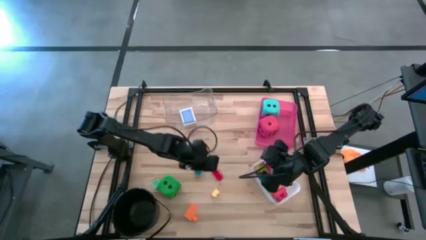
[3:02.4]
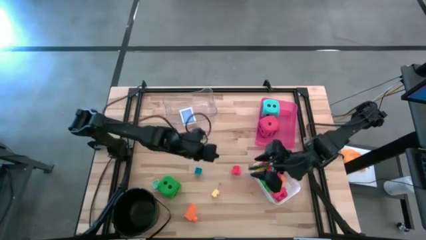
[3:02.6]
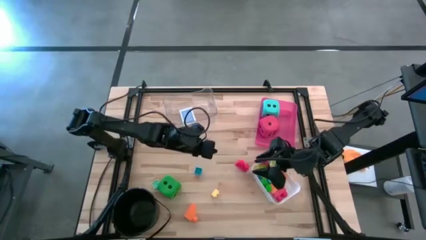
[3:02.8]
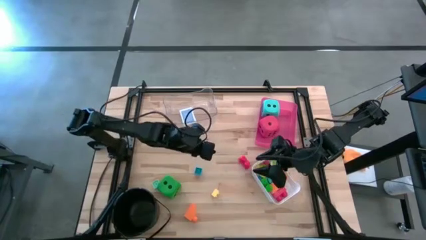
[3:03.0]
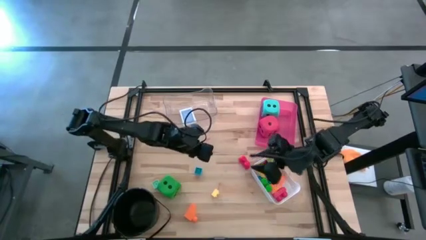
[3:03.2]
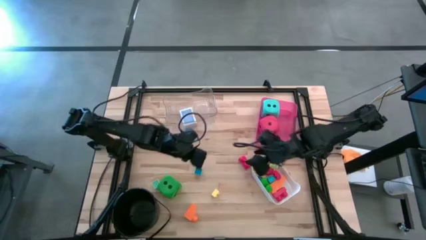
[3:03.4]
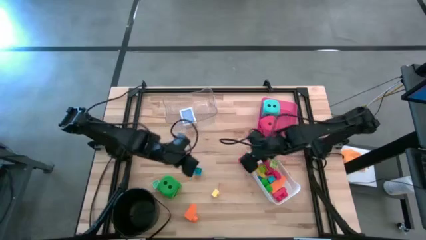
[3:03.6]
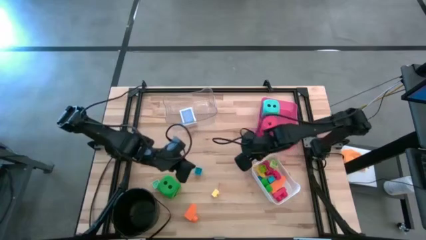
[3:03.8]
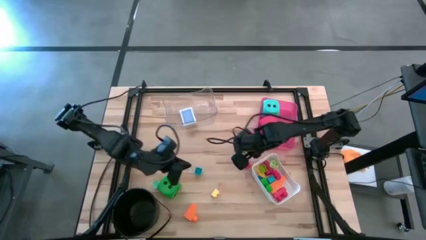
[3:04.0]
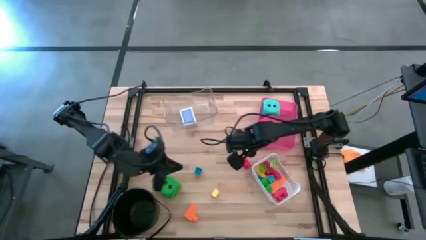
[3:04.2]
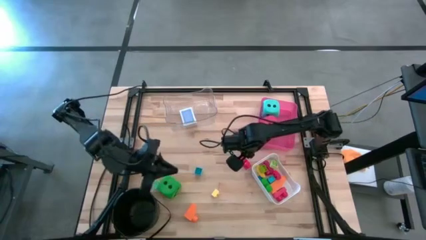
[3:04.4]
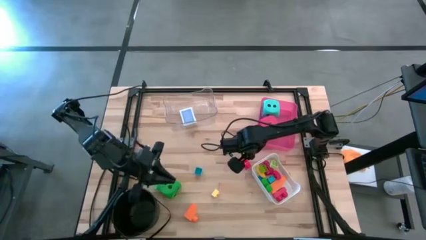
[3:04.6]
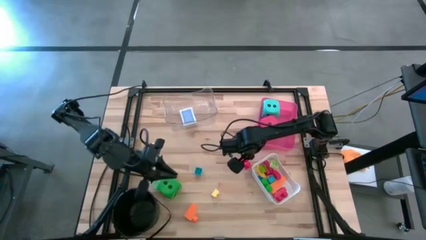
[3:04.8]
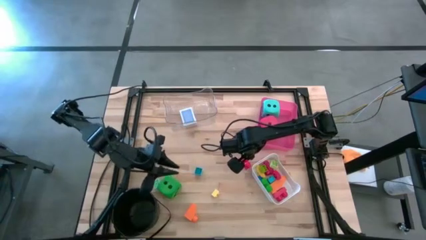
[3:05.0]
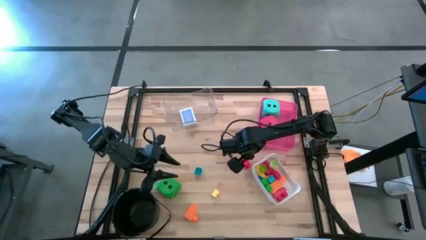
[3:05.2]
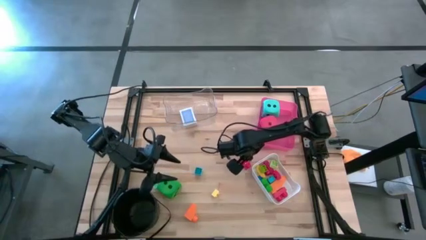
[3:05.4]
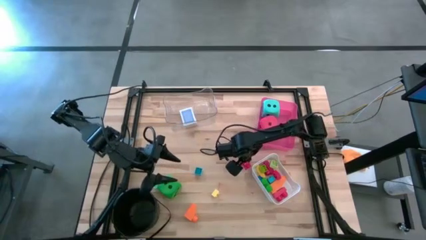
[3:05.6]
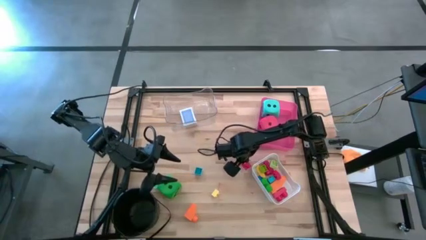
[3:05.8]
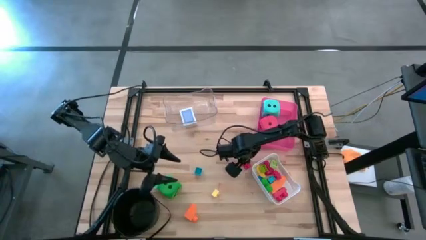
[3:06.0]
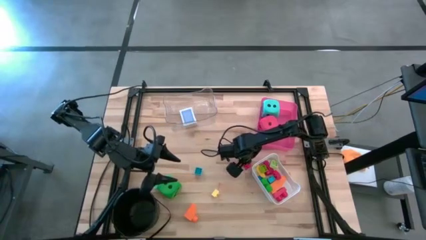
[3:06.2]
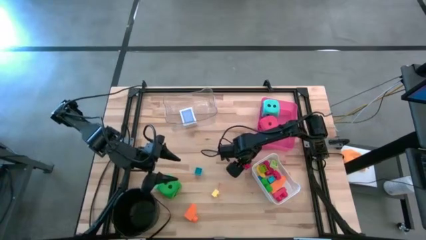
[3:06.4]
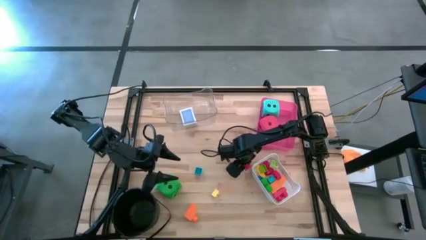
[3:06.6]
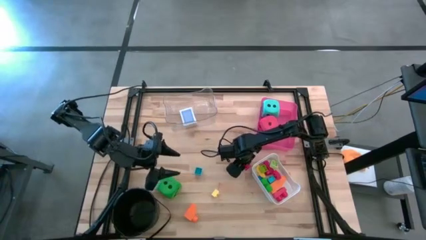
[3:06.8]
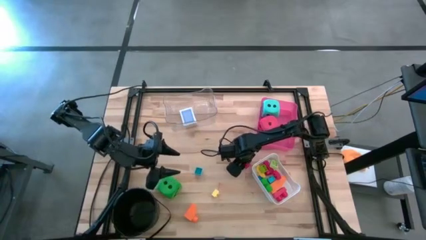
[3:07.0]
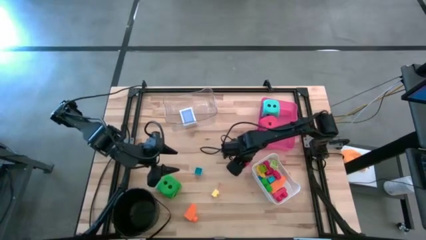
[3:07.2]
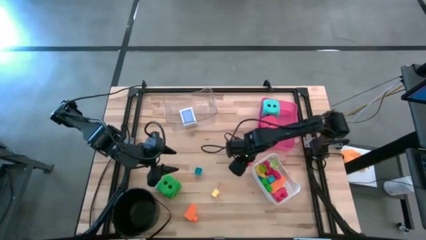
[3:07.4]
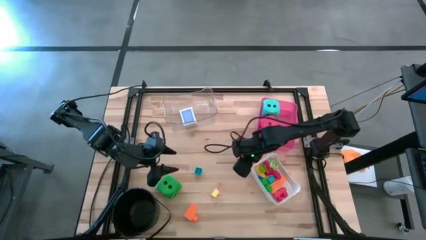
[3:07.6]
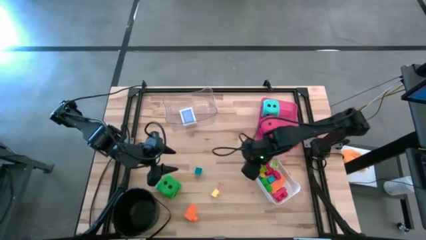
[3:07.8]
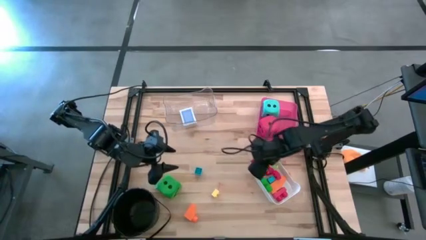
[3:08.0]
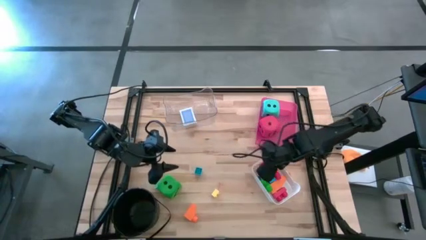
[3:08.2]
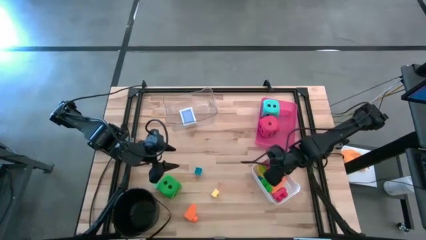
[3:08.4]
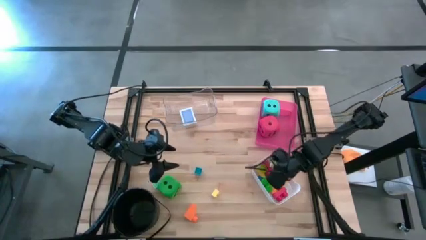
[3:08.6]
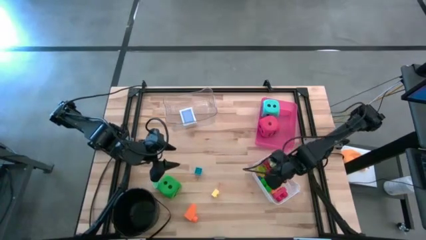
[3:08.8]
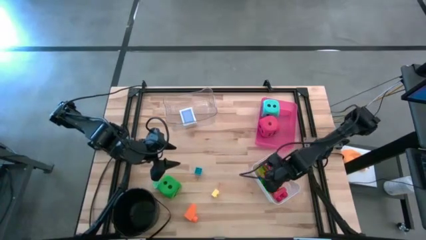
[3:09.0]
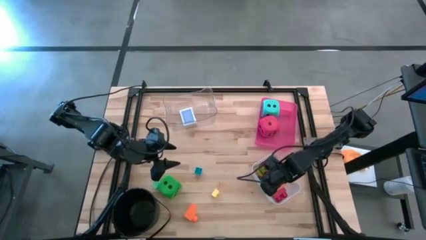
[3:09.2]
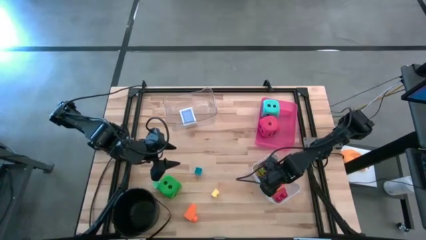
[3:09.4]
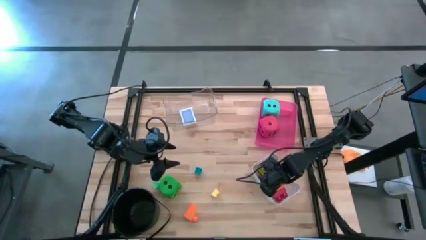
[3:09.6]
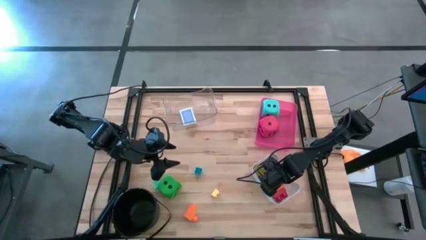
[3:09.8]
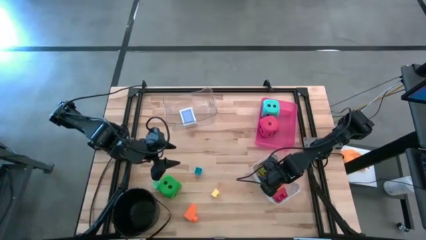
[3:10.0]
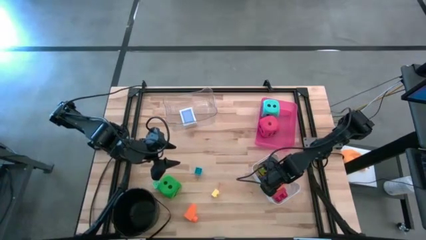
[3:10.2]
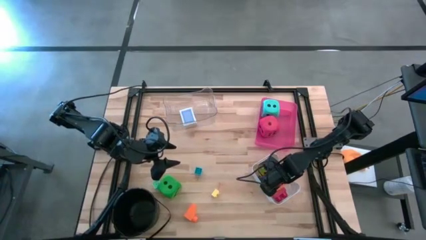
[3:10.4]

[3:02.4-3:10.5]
Task: Pick & Place Toys
Put the red game piece into the white bin

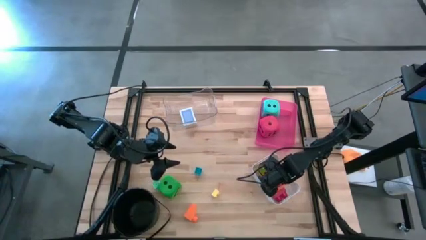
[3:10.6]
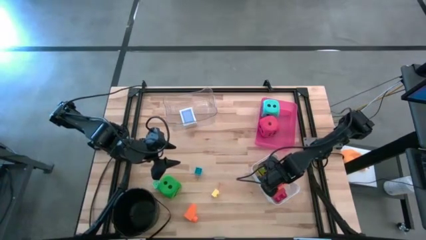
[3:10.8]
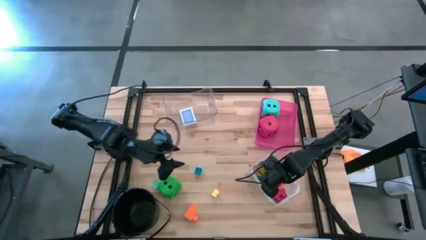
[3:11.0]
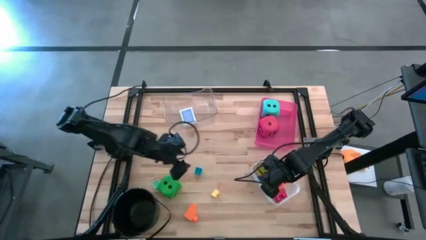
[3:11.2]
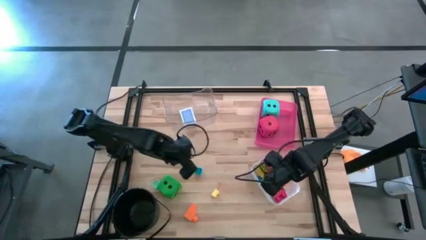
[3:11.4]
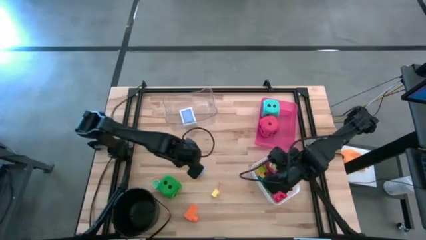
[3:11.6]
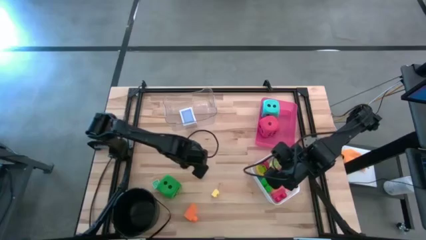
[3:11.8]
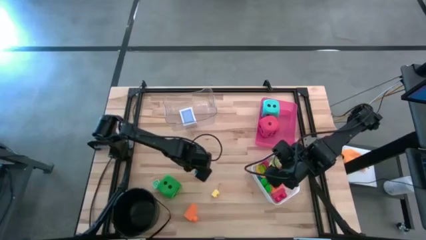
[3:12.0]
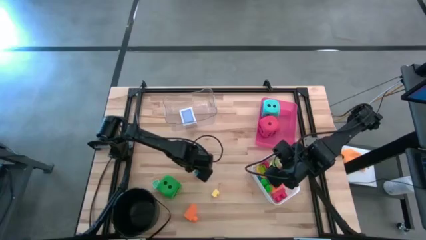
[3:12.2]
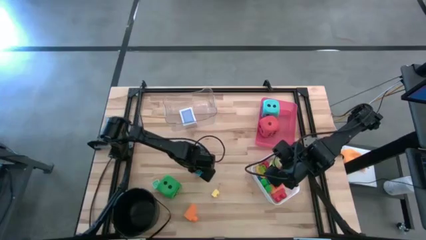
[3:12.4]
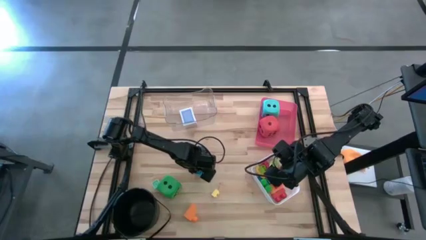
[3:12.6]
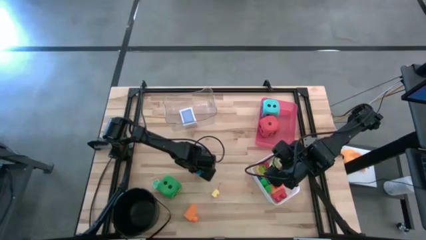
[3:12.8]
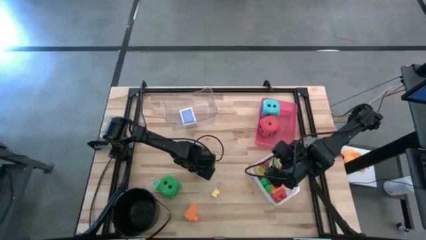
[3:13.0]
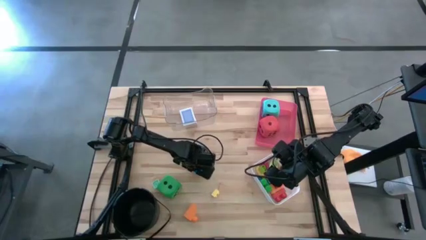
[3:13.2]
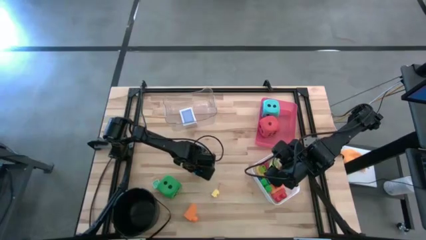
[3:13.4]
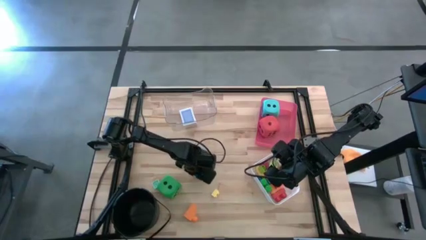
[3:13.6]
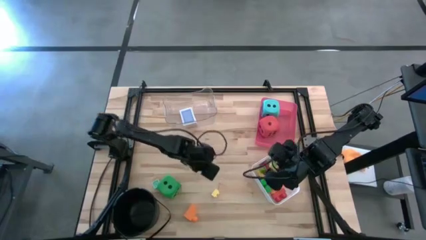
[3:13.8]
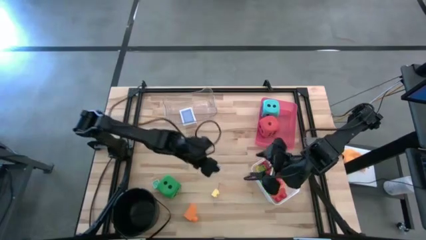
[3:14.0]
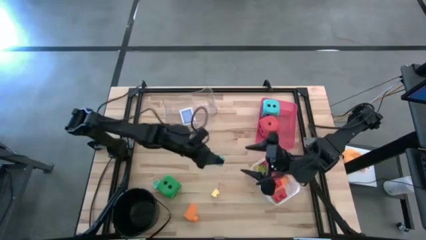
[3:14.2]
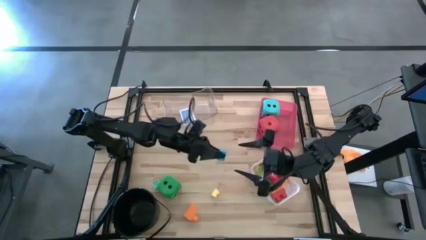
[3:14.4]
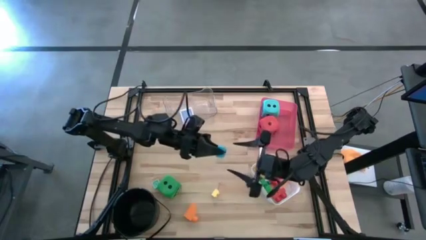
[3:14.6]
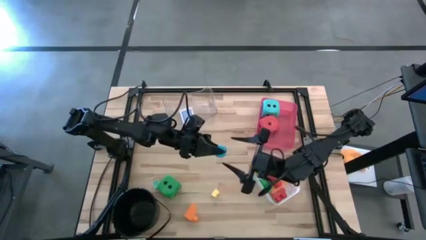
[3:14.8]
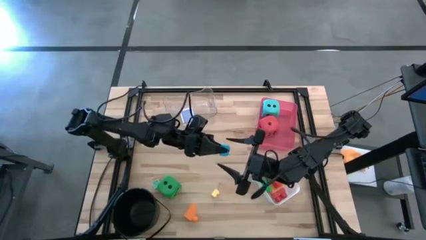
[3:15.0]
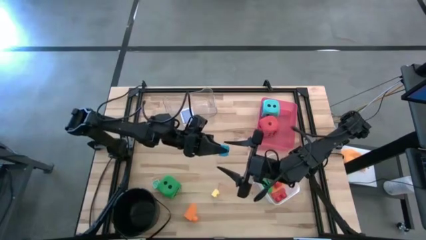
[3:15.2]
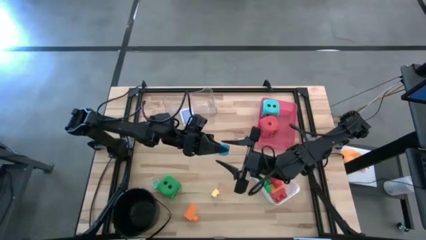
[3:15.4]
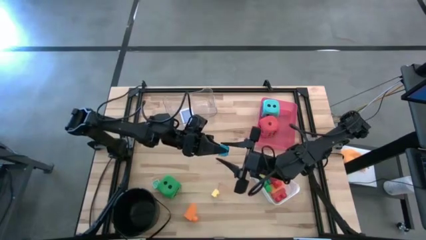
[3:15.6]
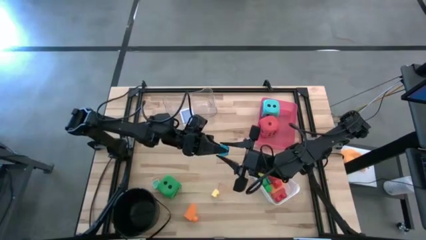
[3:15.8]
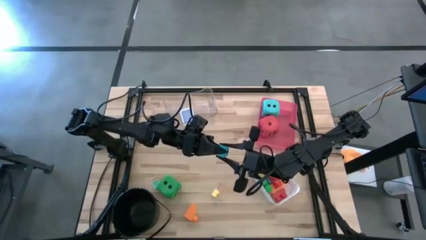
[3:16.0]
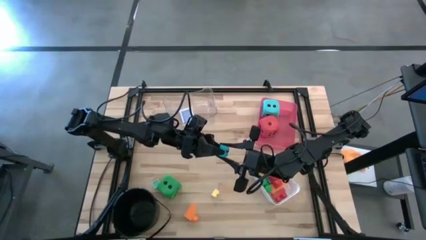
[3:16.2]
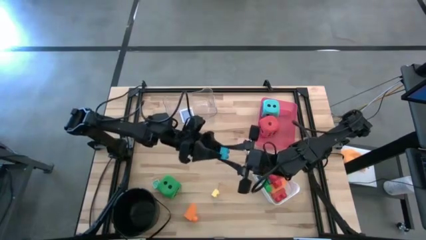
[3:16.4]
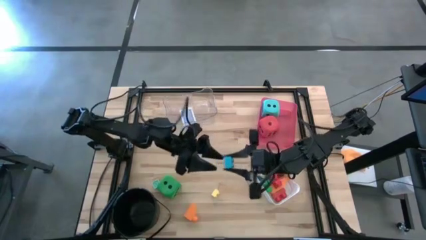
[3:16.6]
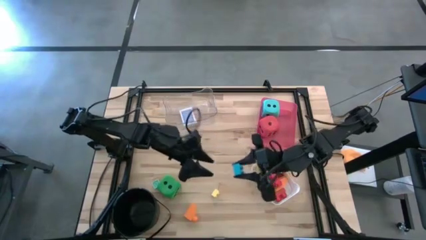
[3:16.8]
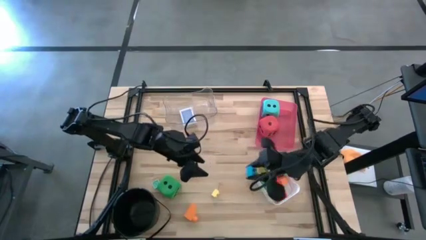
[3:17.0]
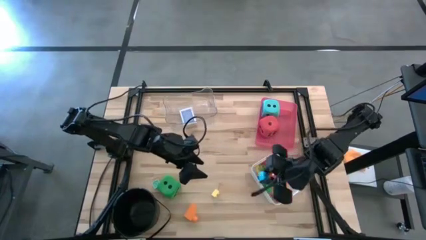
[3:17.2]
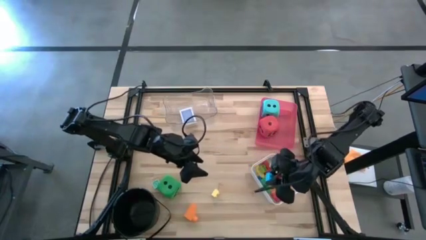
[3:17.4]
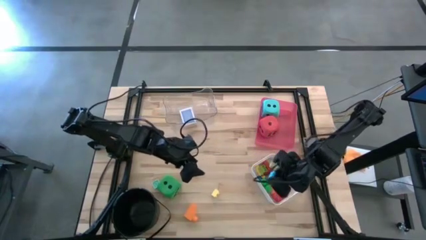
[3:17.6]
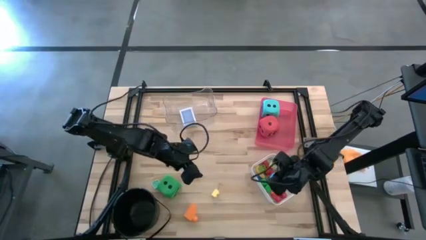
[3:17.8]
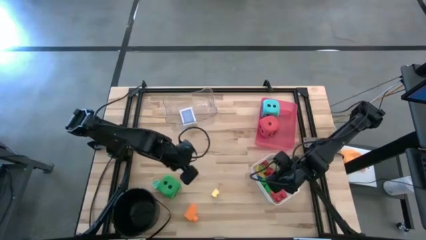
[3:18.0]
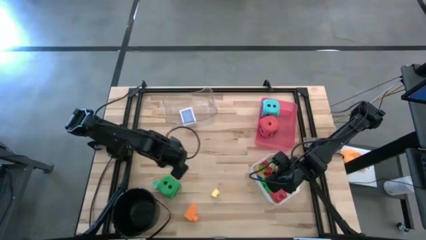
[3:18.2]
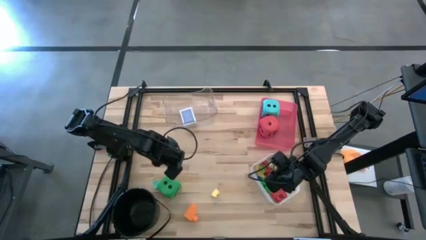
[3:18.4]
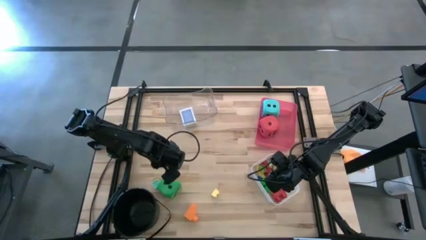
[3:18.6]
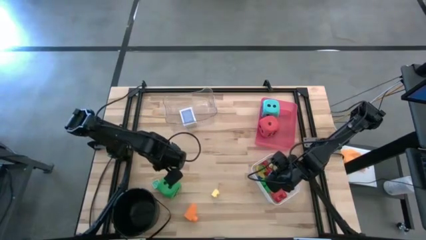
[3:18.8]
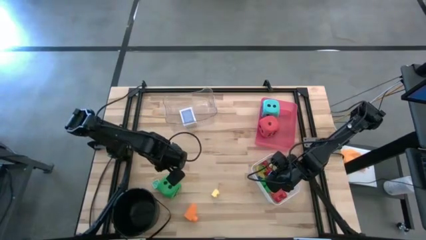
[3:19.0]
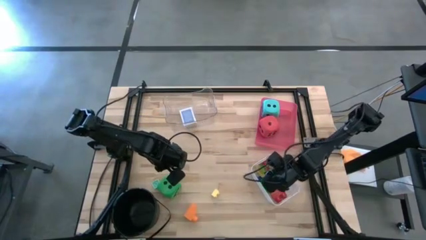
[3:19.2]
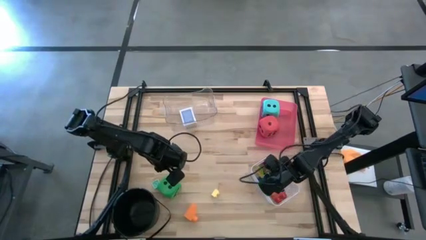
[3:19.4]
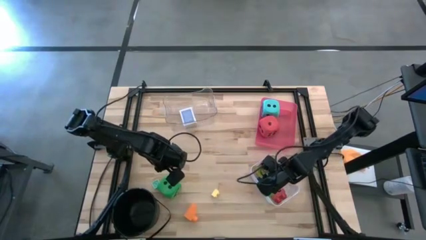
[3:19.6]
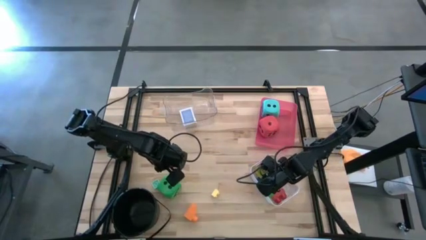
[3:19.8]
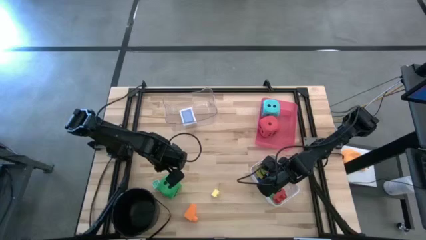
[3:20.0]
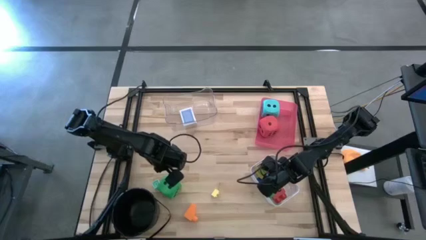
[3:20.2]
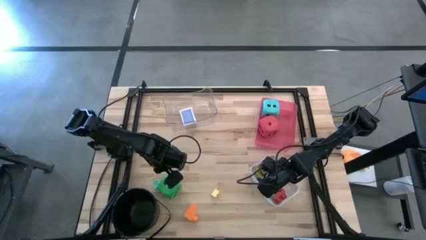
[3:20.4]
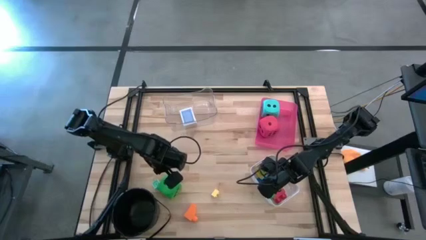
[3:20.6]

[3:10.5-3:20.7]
Put the blue game piece into the white bin
